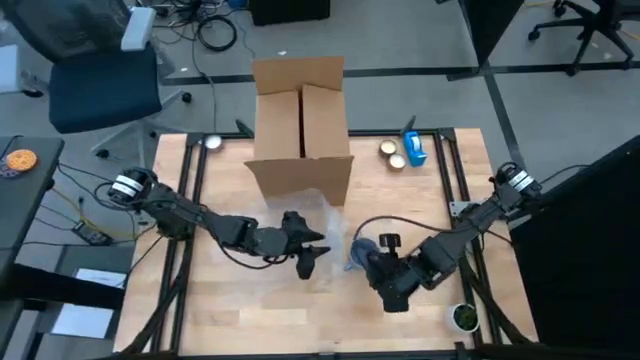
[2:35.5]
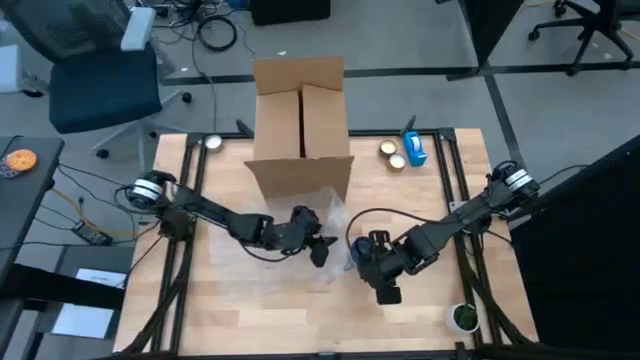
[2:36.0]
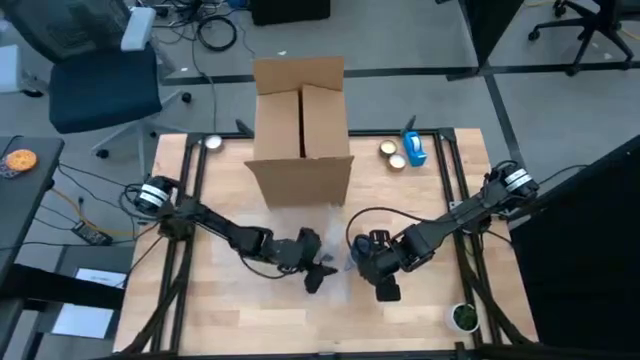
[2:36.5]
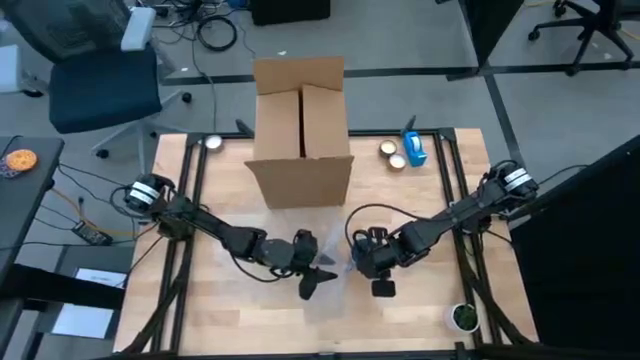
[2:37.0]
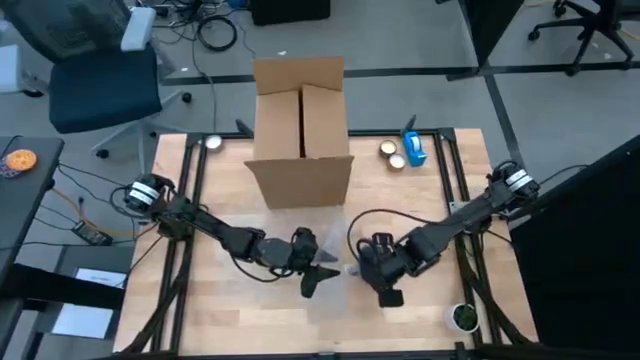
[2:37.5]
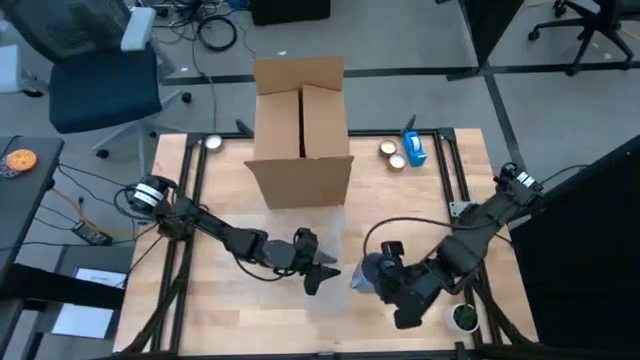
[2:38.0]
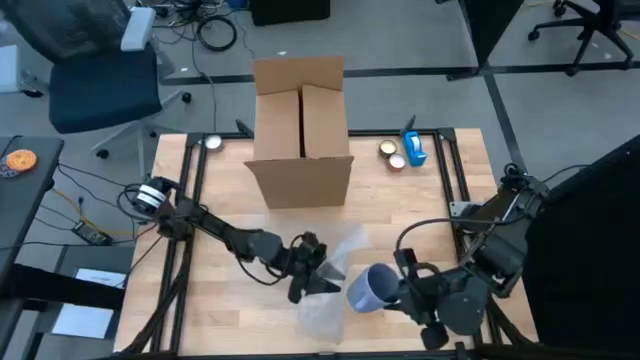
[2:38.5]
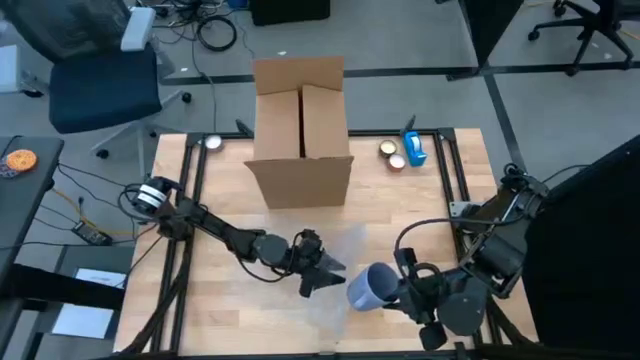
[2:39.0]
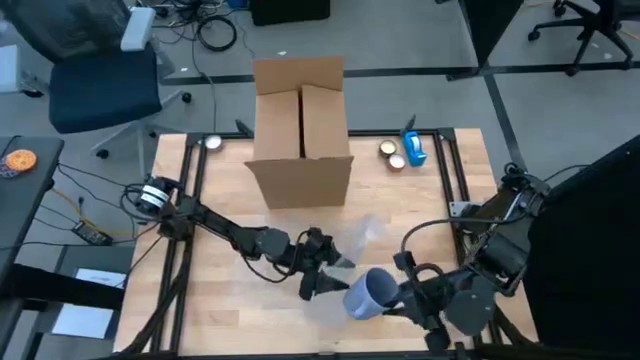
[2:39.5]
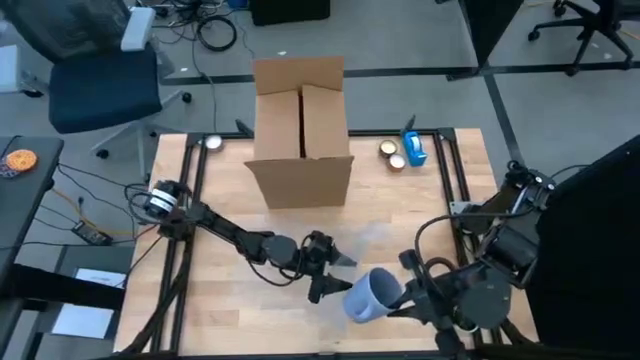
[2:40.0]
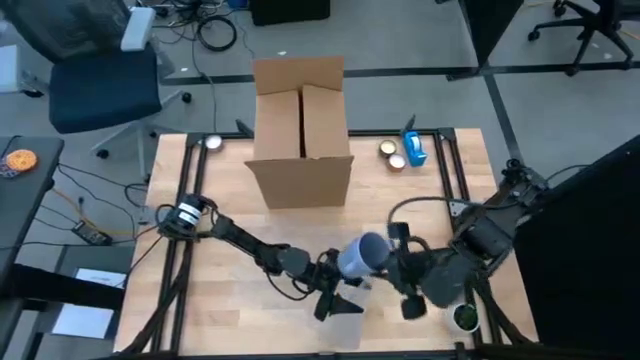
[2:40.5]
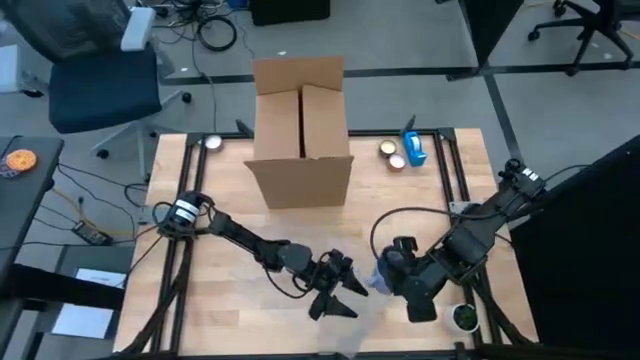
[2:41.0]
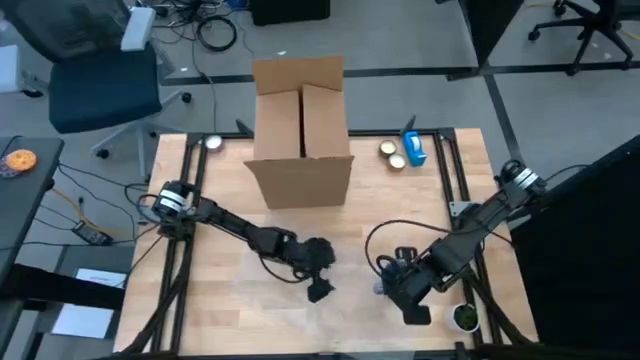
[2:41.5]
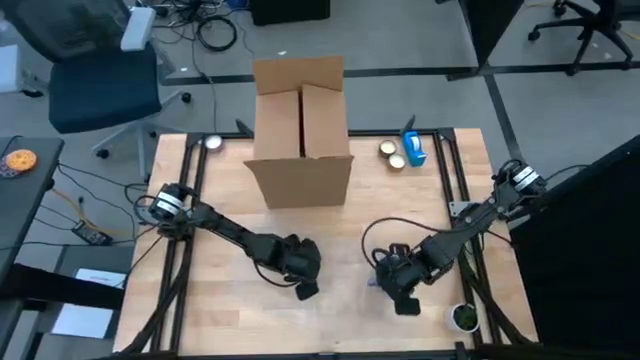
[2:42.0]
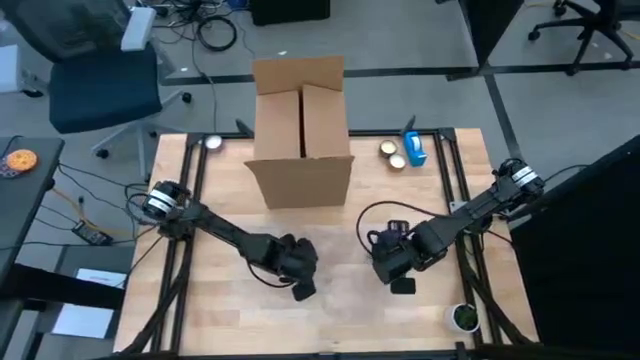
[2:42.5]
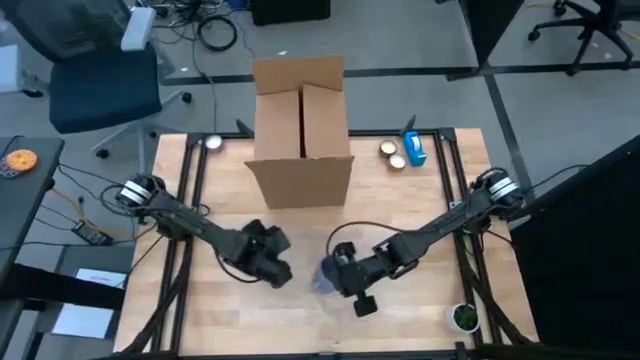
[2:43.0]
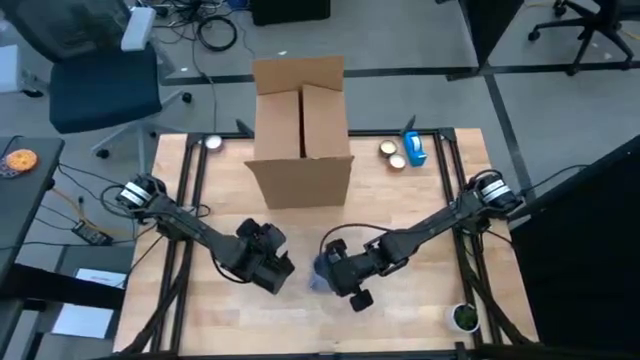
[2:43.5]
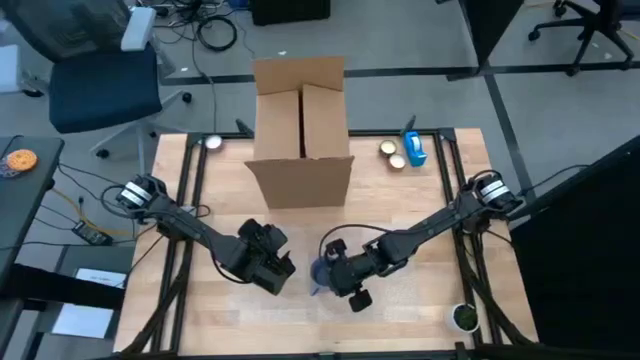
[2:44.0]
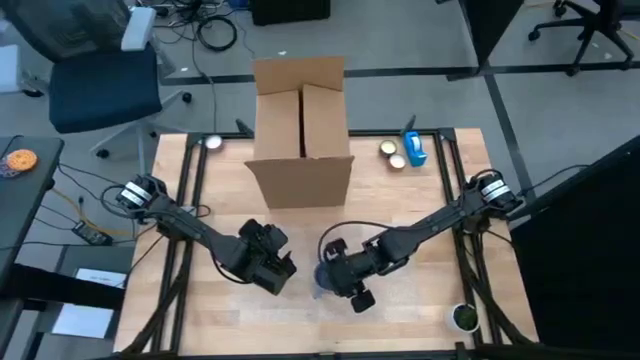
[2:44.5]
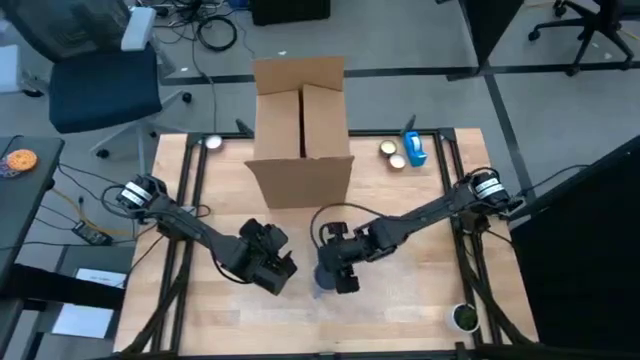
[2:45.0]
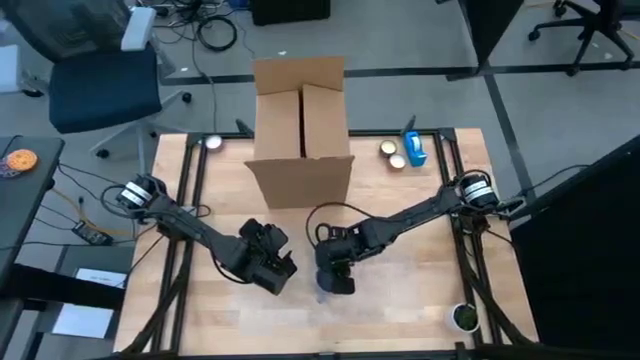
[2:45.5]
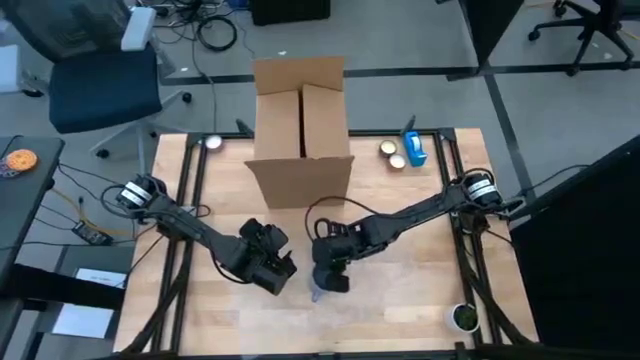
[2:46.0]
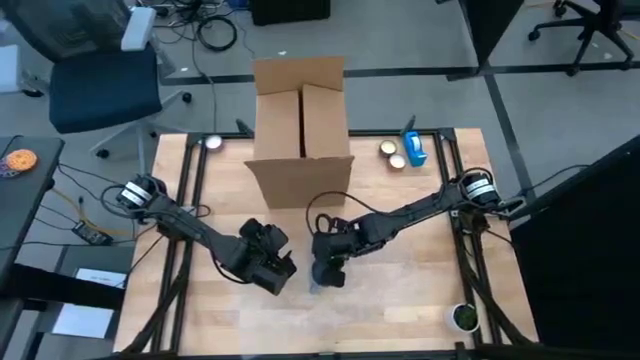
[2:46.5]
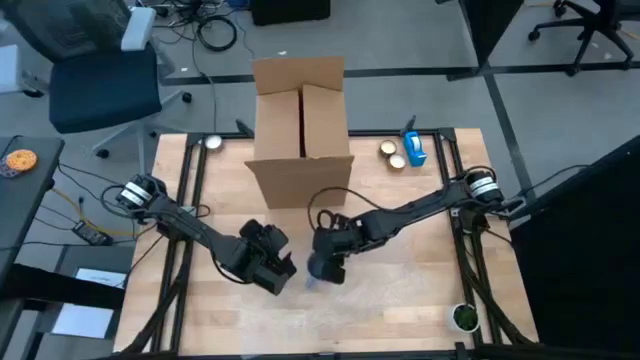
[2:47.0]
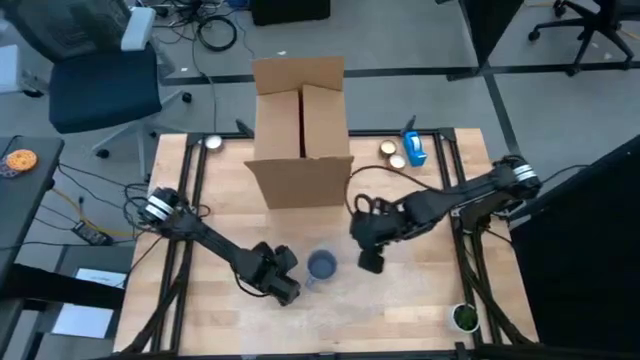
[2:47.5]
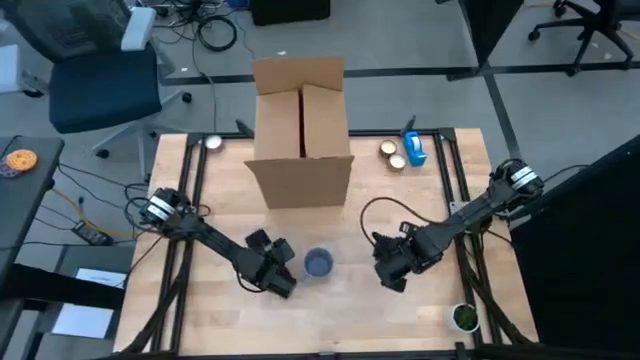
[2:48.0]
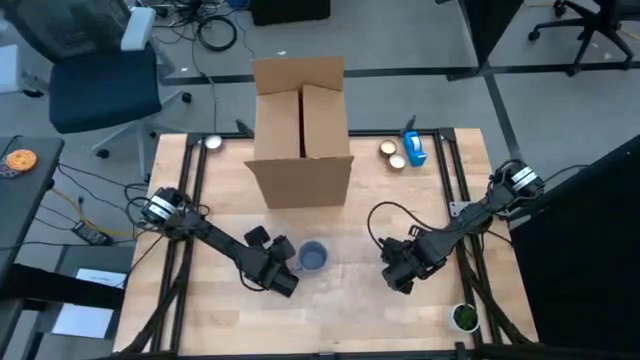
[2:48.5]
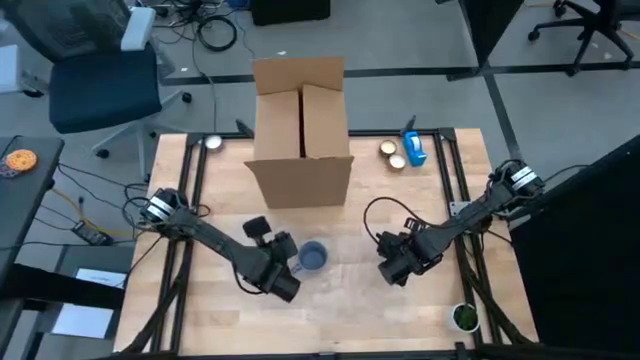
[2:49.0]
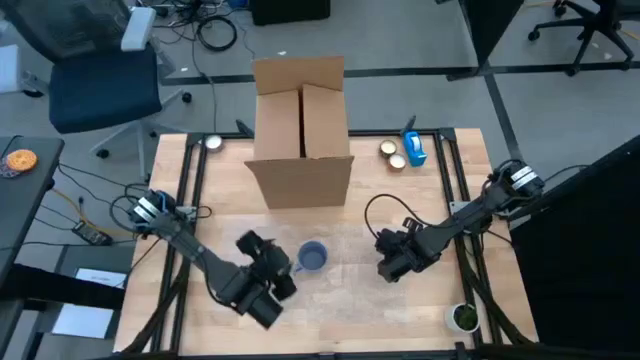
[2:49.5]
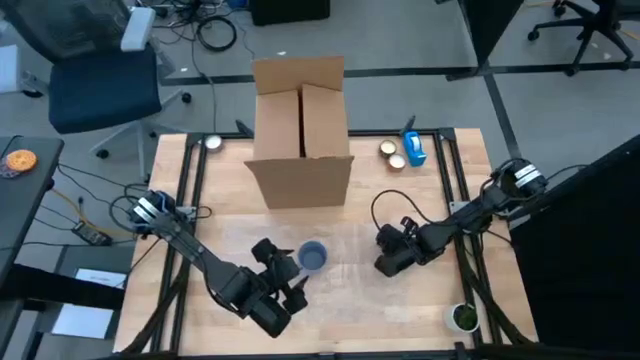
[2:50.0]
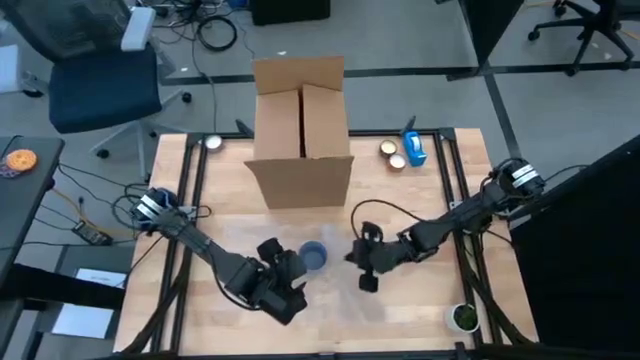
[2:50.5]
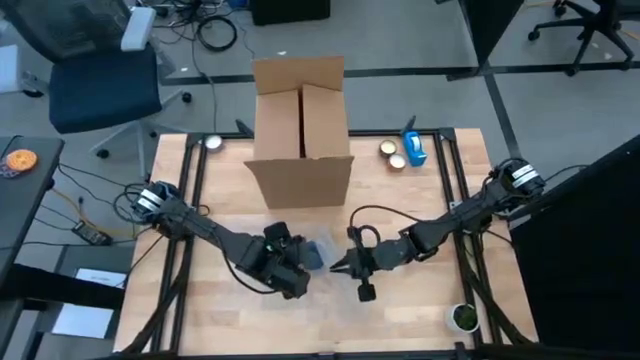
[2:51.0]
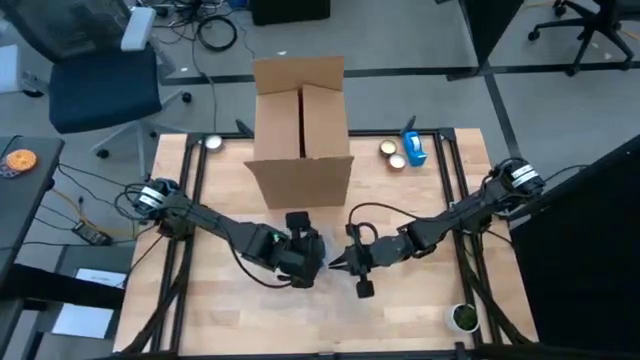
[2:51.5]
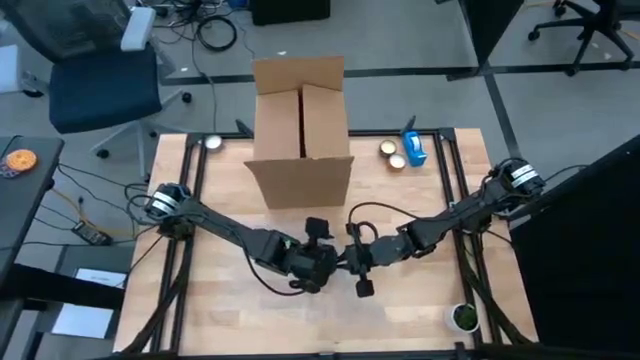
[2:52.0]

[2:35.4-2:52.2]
Task: wrap mug
Wrap the blue mug with bubble wrap

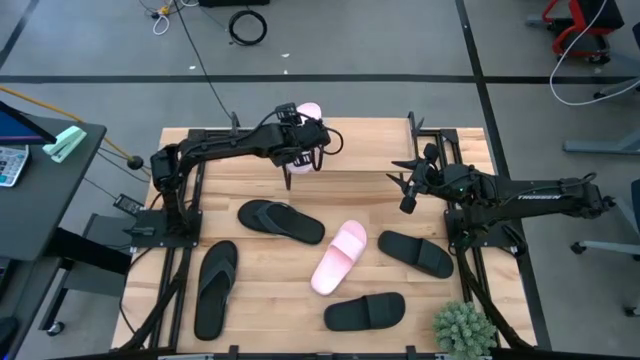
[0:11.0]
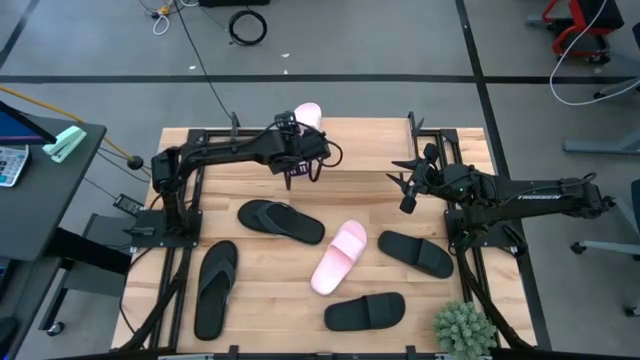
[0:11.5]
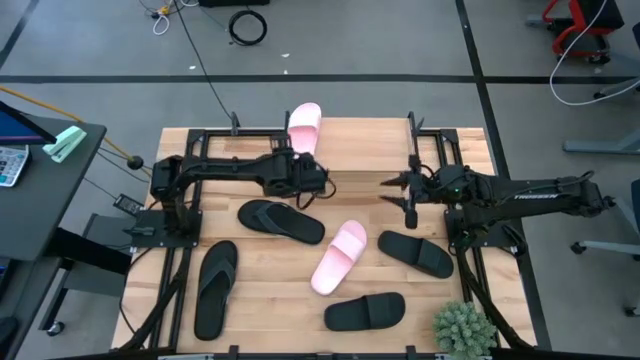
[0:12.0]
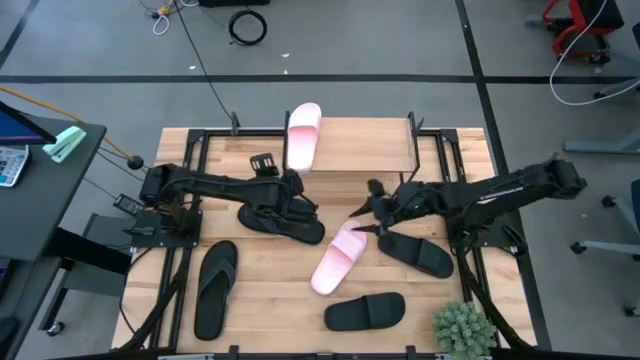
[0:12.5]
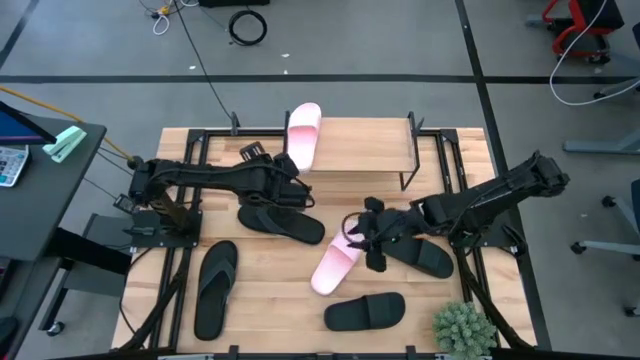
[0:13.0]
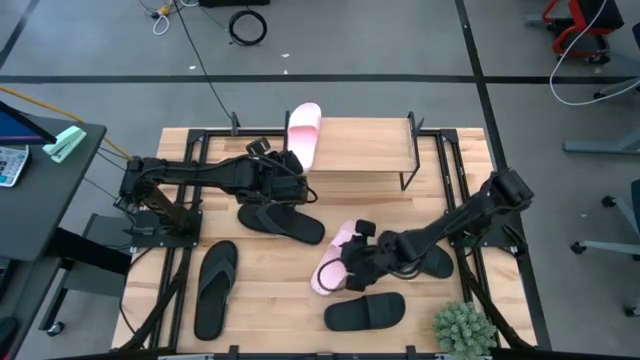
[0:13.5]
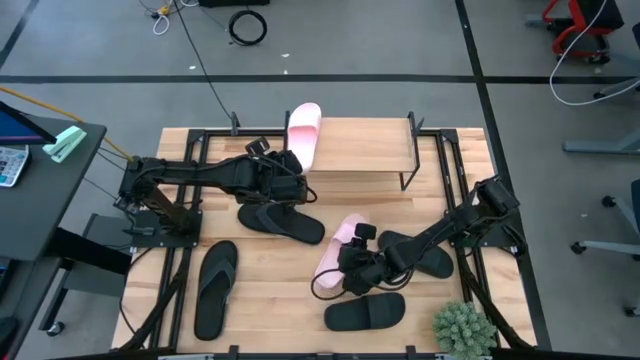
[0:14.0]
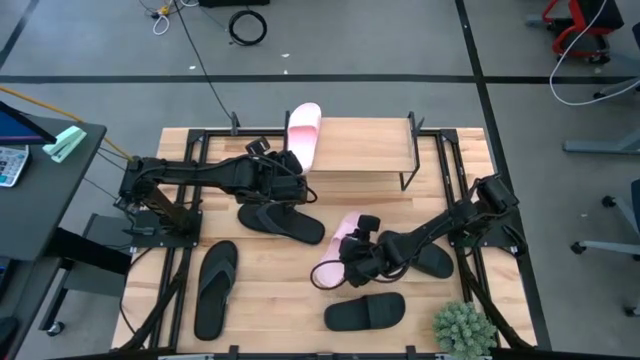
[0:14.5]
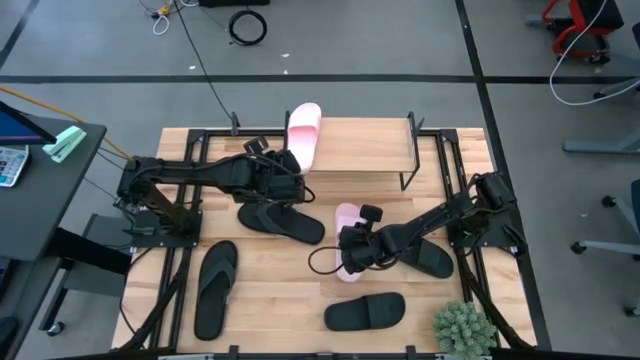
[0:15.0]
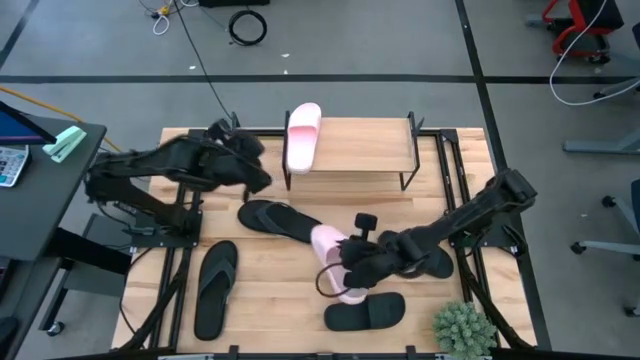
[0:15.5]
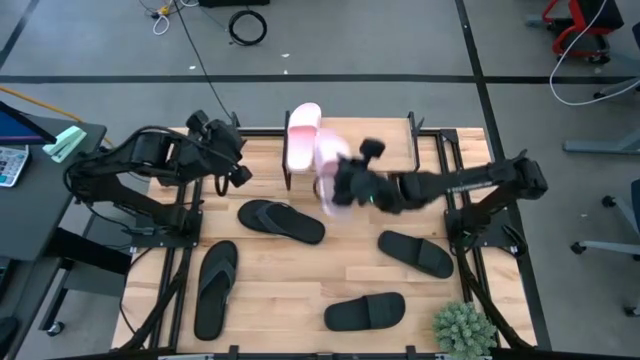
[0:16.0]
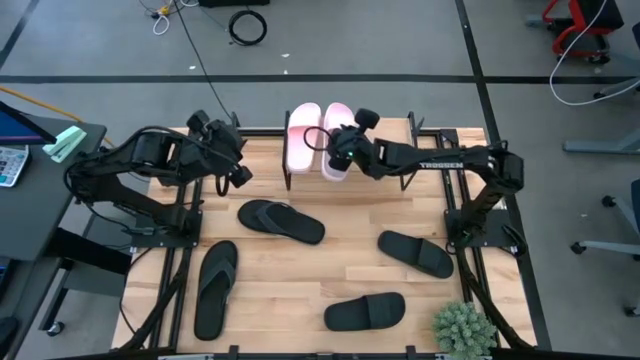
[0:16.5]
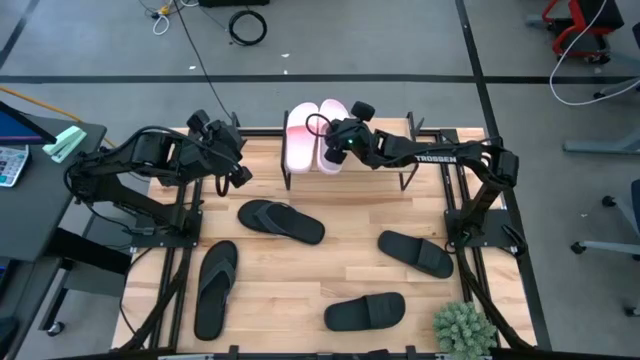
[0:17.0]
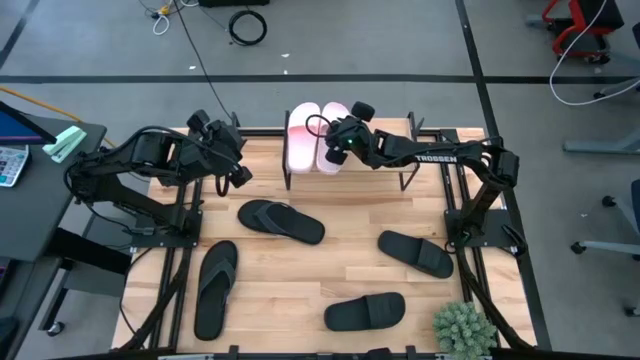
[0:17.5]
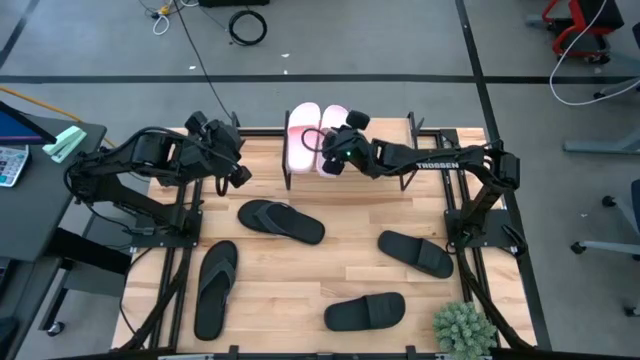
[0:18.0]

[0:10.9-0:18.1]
Task: Pick and place slides into the shelf
Put the pink slide on the shelf
